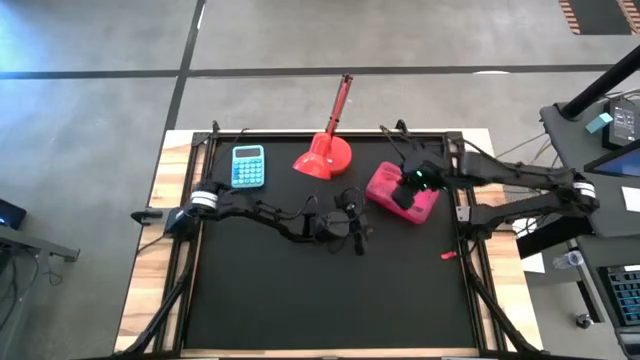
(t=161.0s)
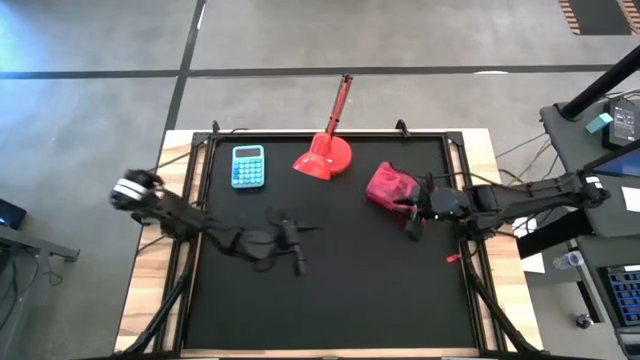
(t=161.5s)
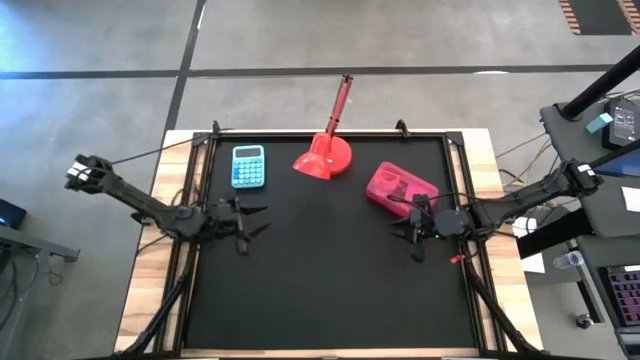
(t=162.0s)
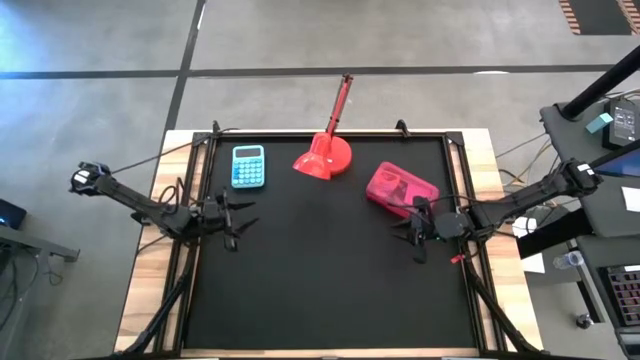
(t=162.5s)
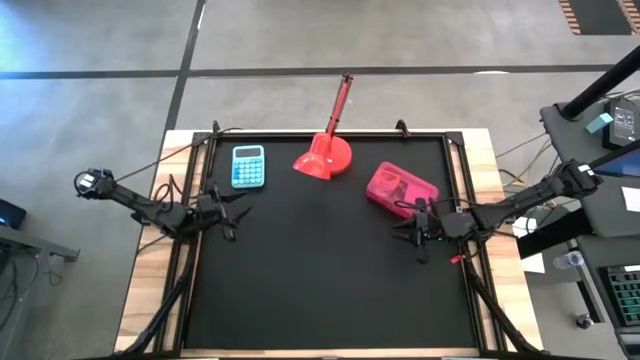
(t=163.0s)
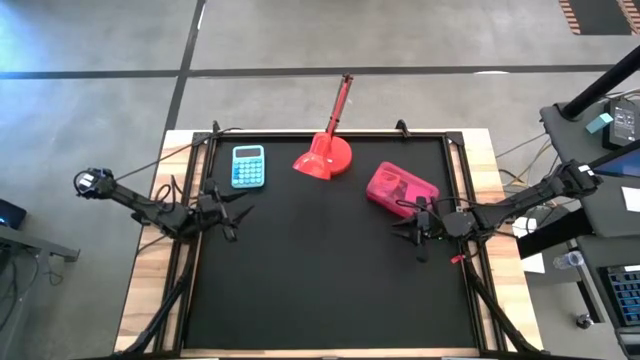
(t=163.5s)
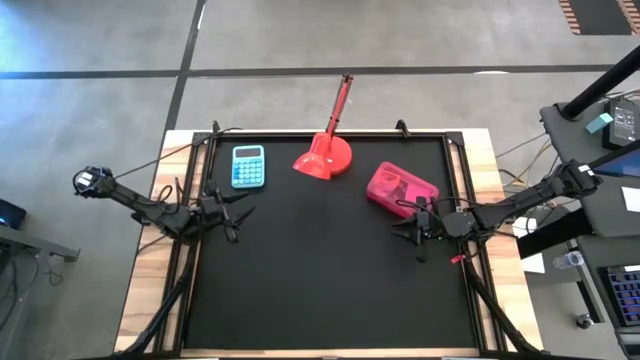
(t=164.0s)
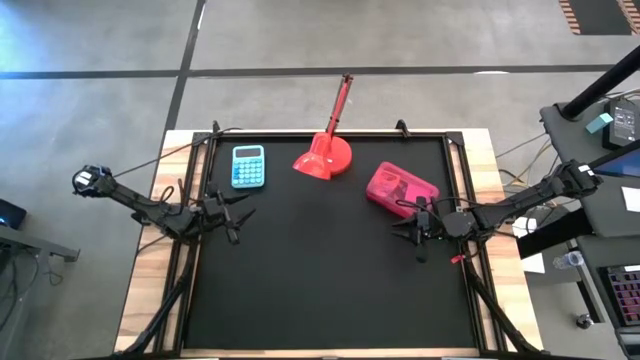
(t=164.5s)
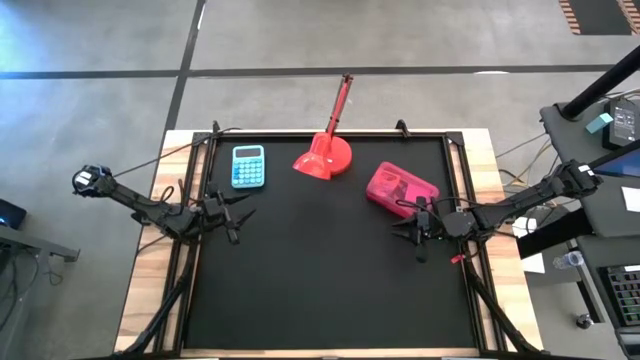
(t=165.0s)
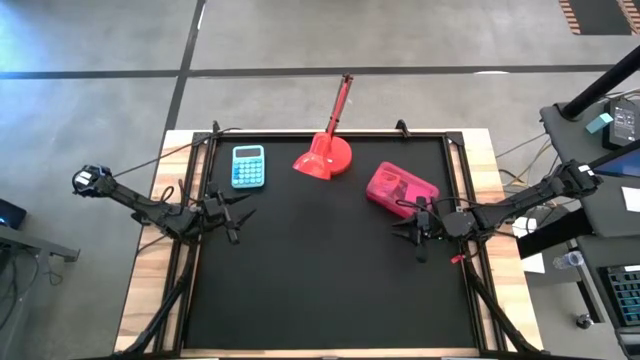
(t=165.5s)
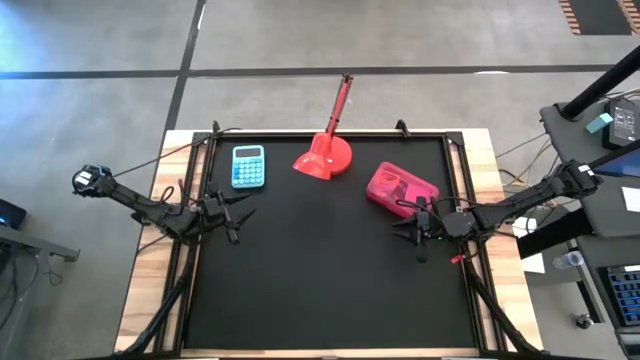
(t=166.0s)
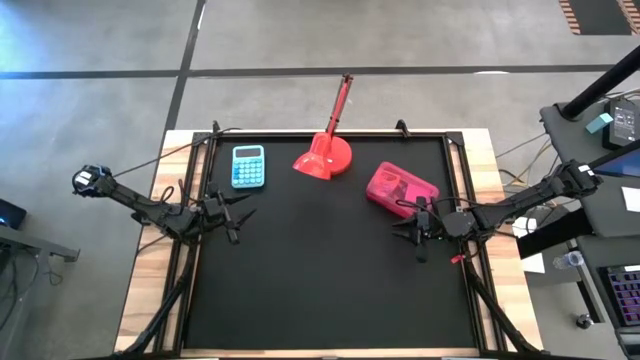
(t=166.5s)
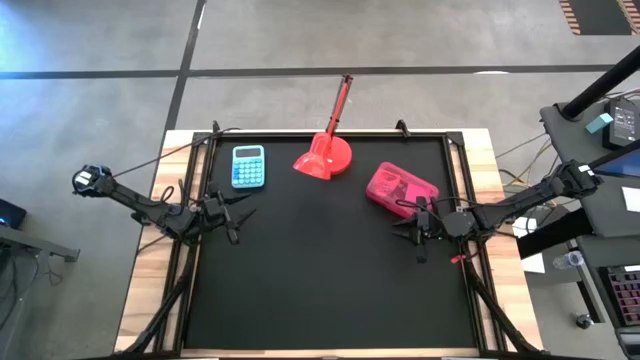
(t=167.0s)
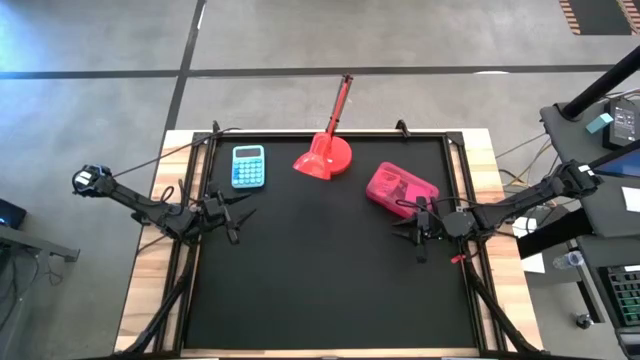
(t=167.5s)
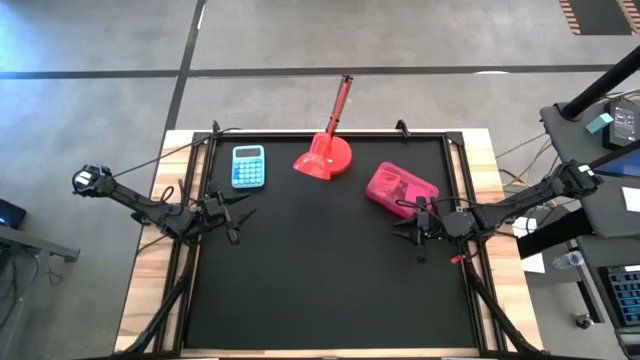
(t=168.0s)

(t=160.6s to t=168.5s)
Task: Pack school essentials
Return to Home Position

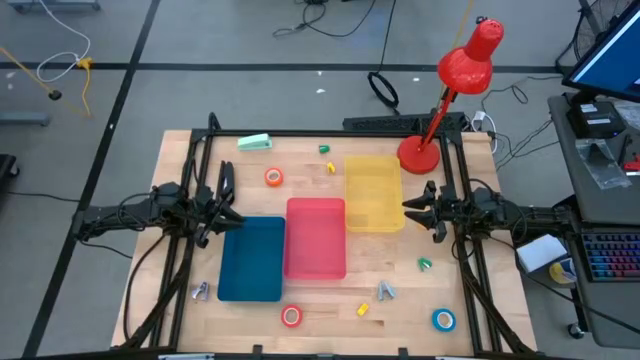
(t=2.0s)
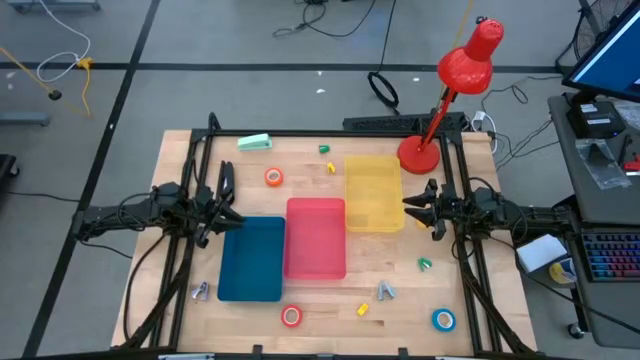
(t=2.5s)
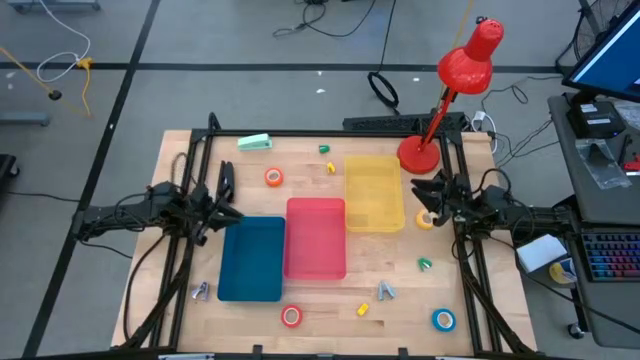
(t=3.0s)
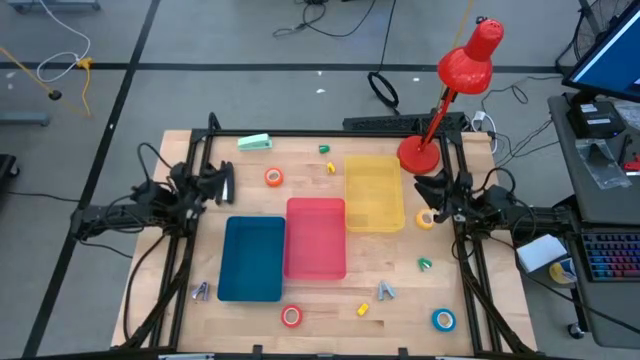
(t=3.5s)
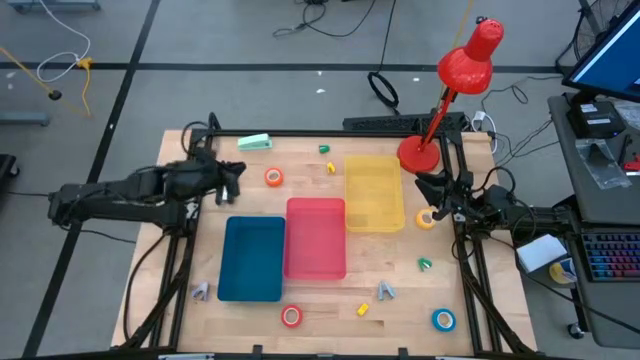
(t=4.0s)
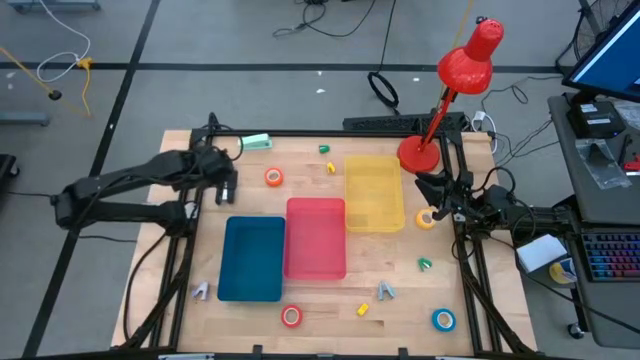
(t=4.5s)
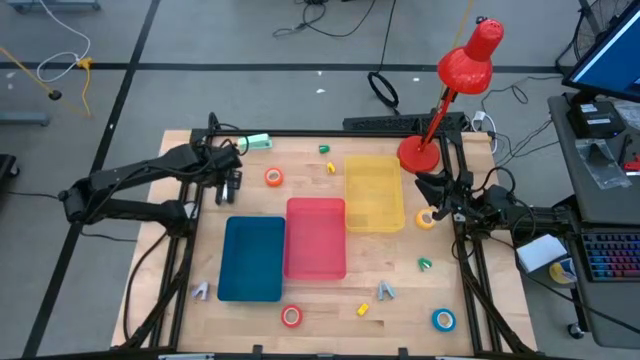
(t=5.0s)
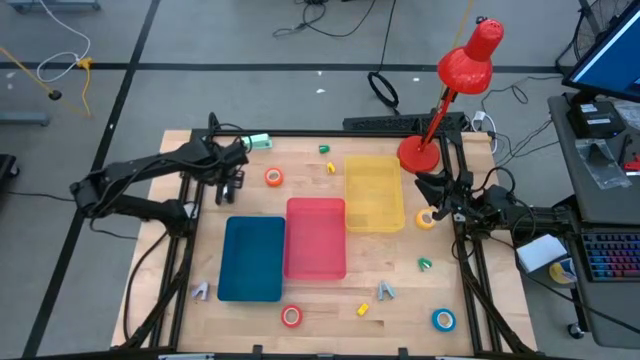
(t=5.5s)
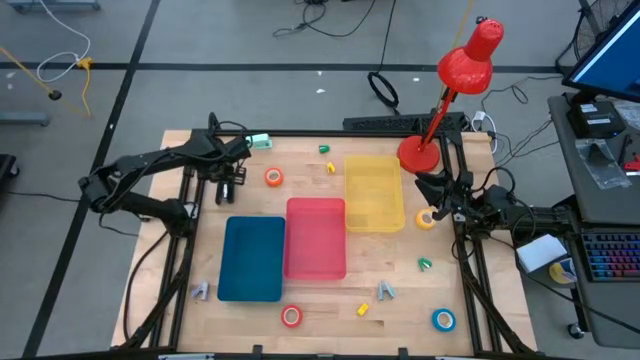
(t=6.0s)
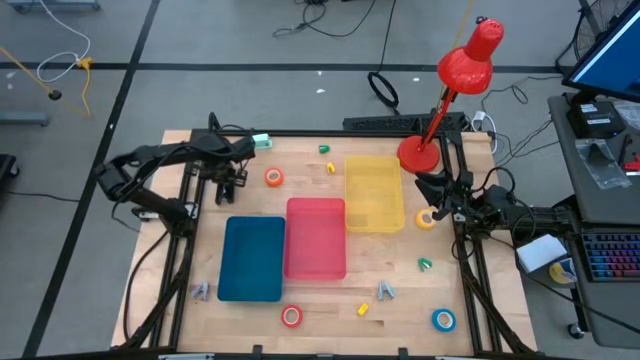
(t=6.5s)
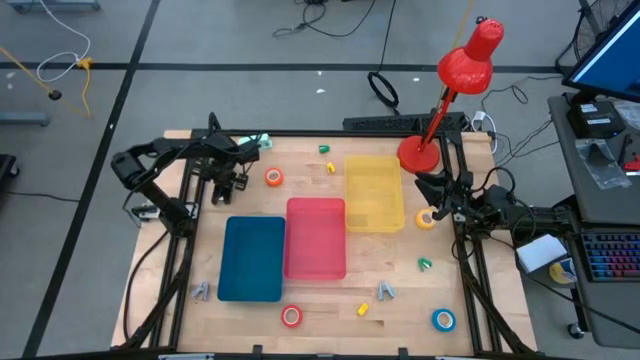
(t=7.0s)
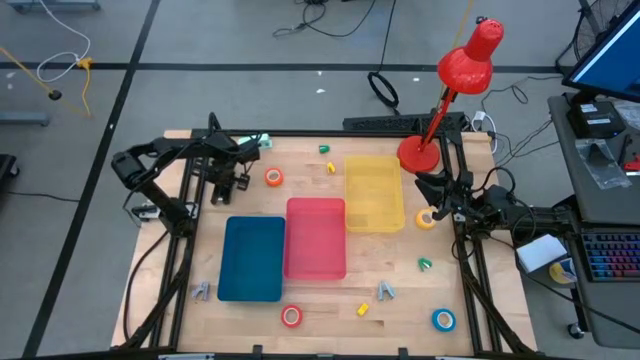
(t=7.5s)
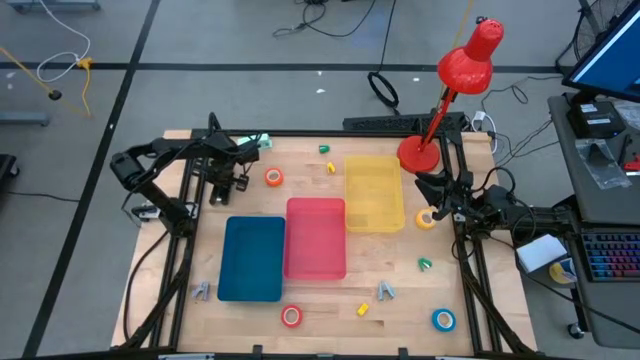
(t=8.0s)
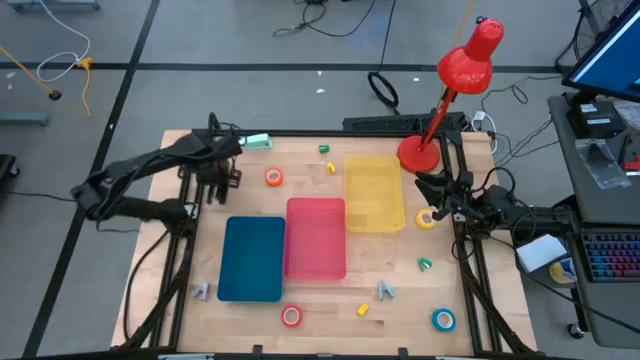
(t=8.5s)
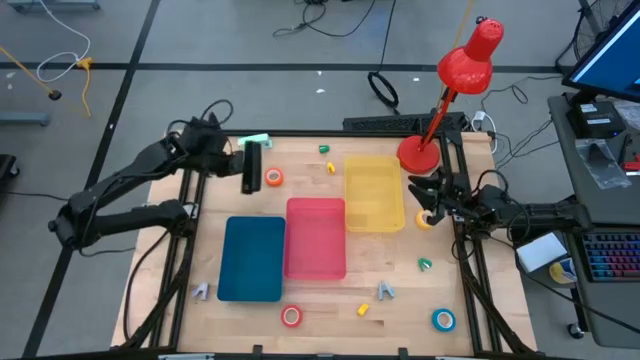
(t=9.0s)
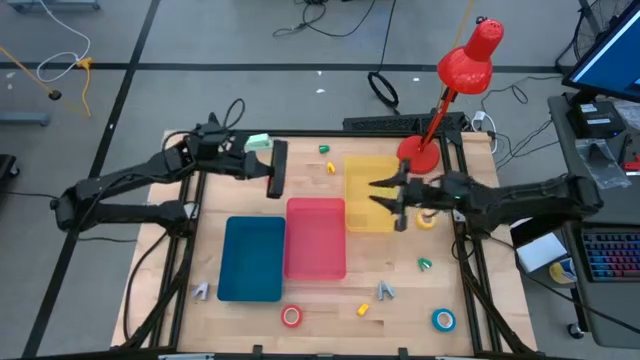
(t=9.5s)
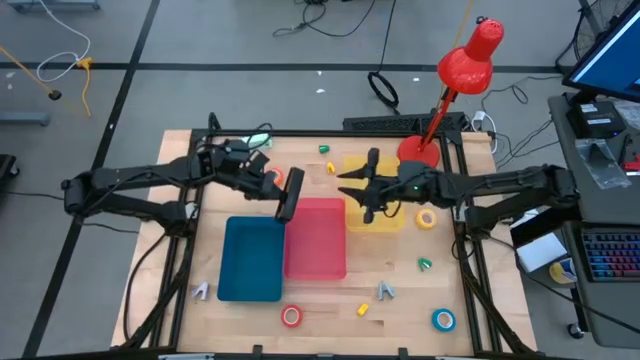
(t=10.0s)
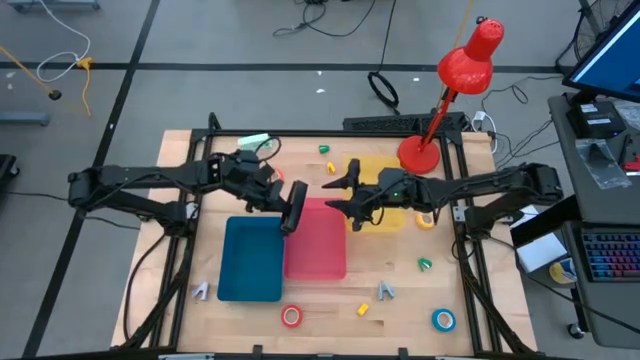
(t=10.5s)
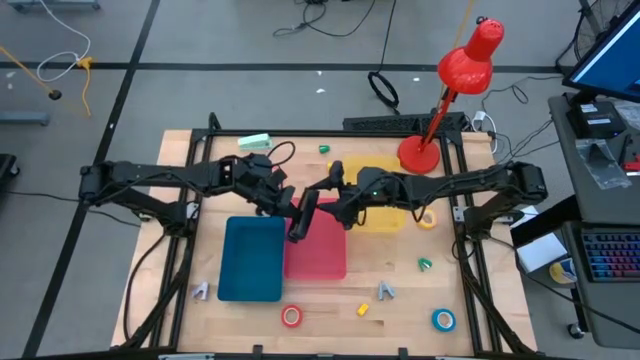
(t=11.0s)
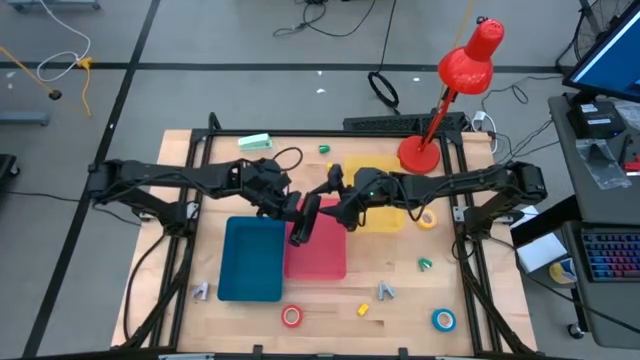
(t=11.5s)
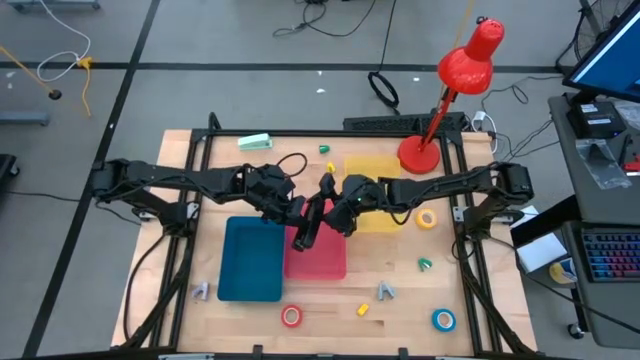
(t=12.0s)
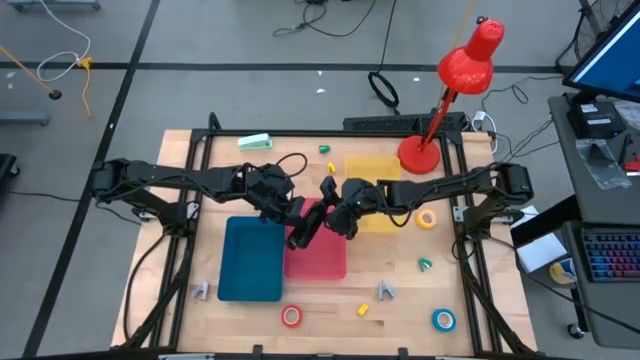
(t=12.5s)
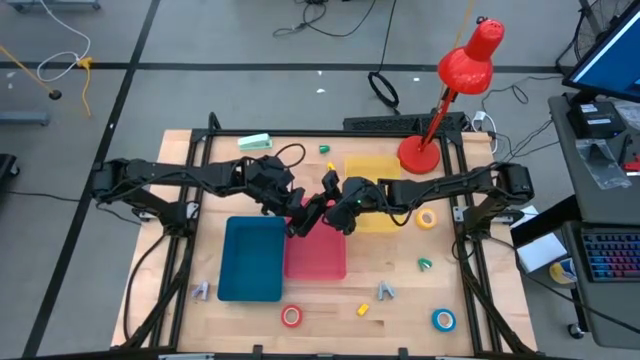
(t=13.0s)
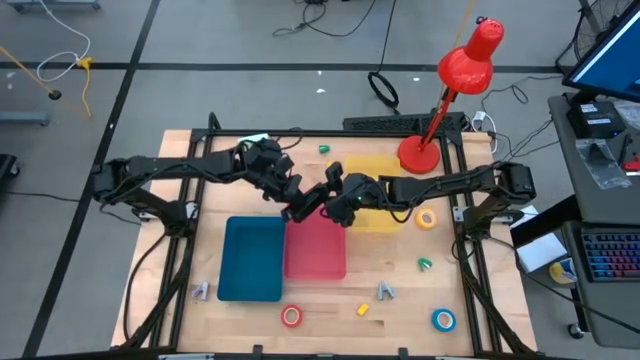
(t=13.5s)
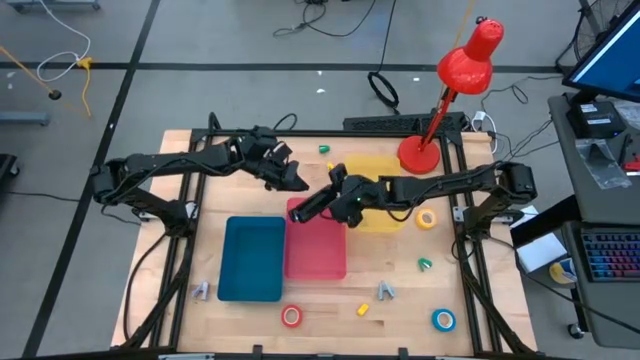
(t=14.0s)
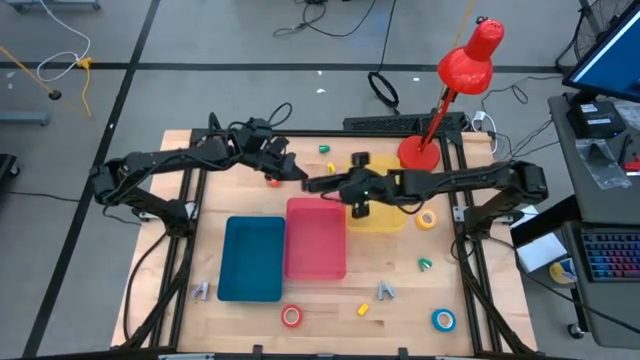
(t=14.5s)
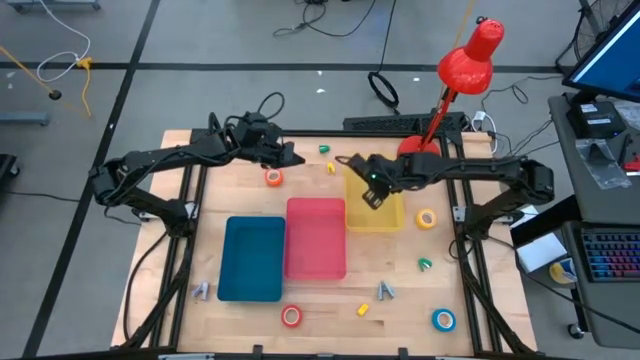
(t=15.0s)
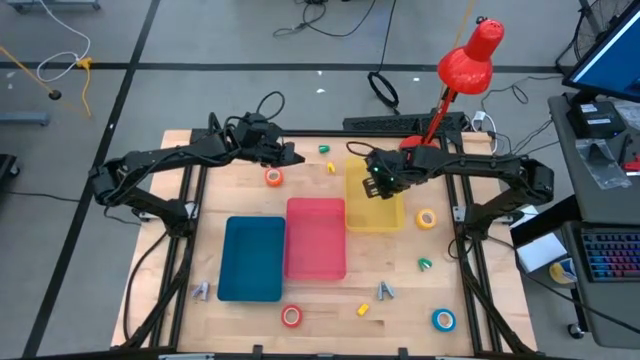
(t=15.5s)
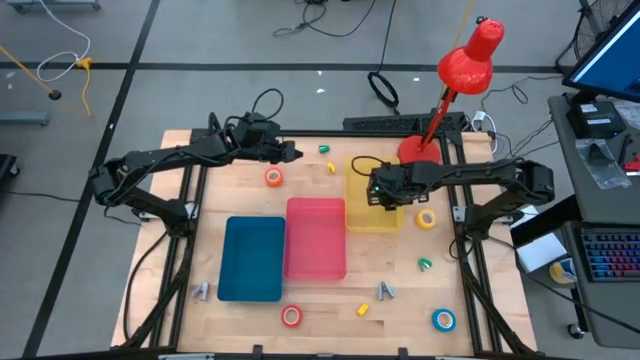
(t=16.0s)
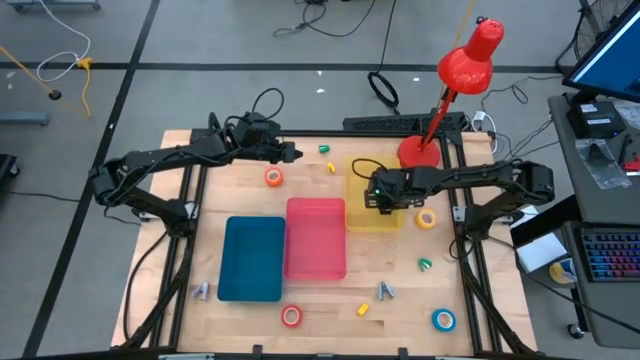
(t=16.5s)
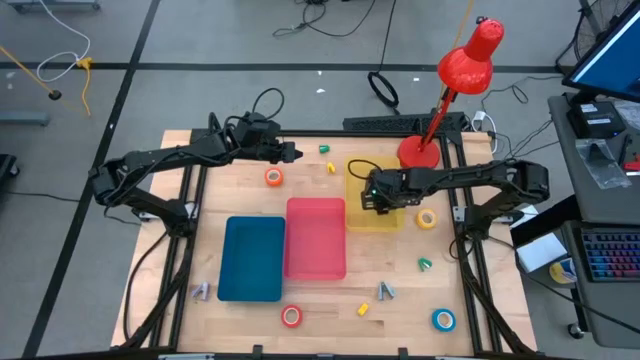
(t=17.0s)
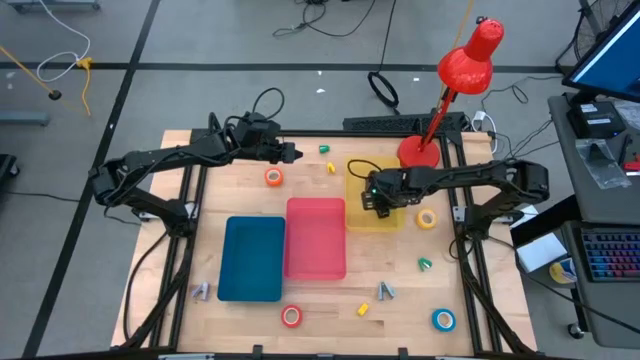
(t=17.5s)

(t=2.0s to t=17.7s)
Task: Pick and place Stapler, Stapler remover, tape
Put the black stapler into the yellow bin
